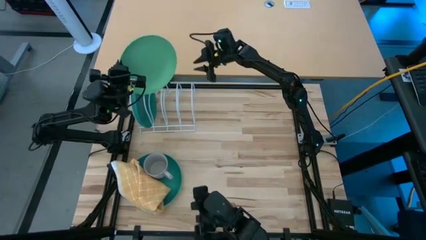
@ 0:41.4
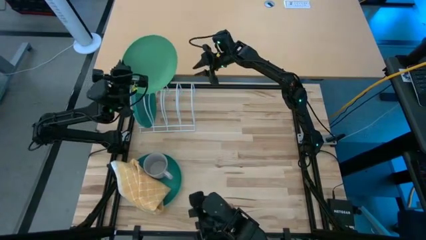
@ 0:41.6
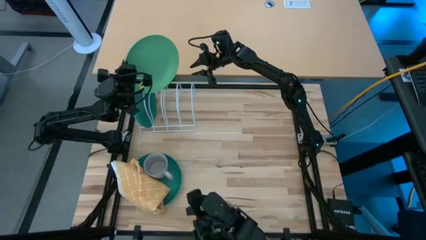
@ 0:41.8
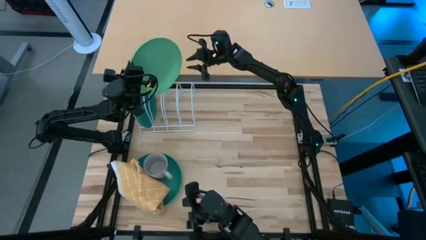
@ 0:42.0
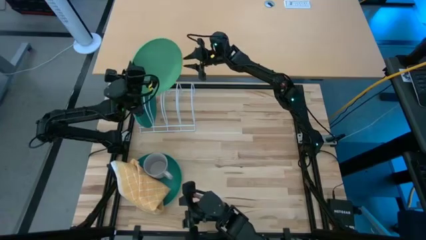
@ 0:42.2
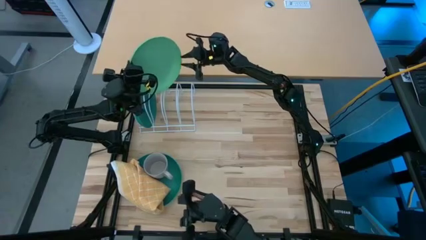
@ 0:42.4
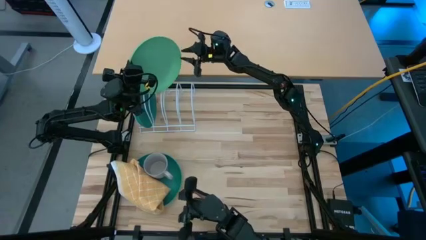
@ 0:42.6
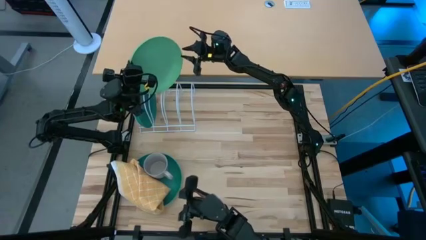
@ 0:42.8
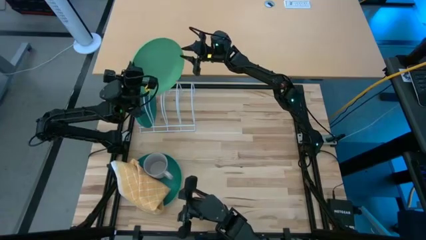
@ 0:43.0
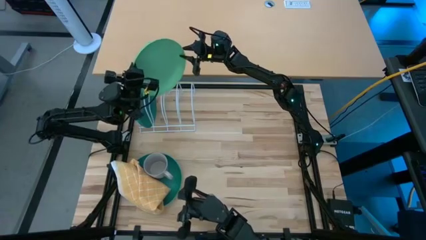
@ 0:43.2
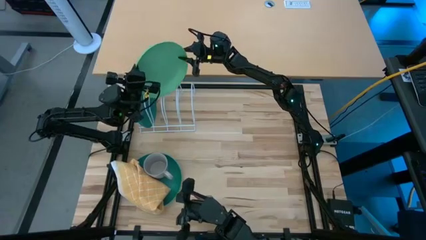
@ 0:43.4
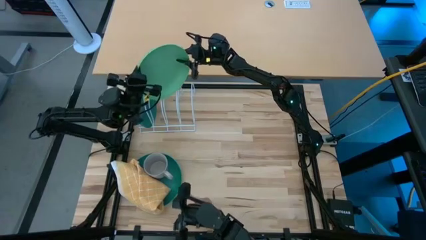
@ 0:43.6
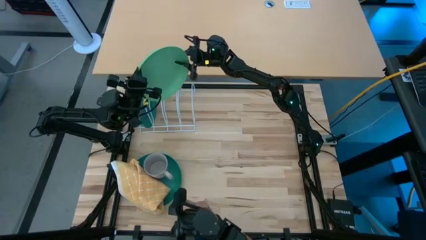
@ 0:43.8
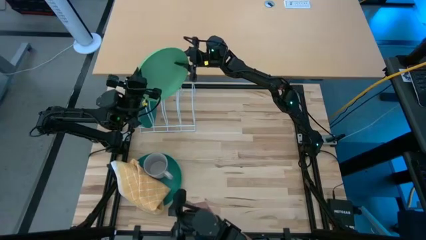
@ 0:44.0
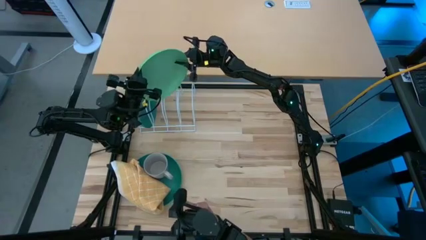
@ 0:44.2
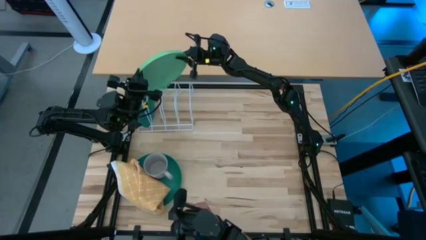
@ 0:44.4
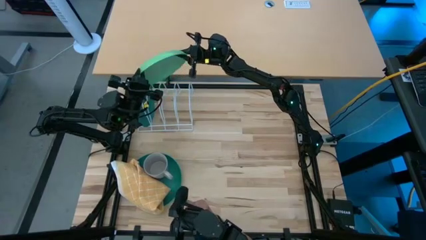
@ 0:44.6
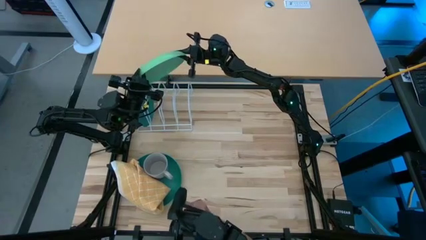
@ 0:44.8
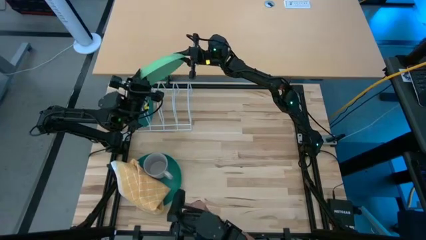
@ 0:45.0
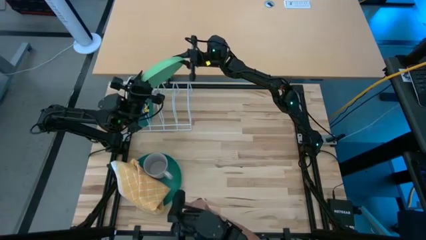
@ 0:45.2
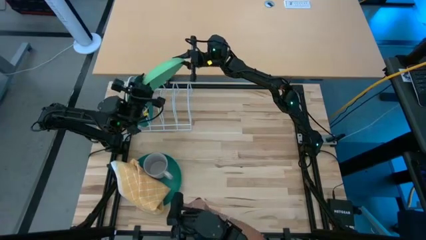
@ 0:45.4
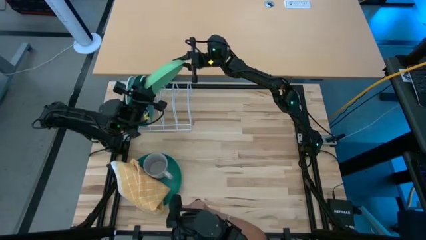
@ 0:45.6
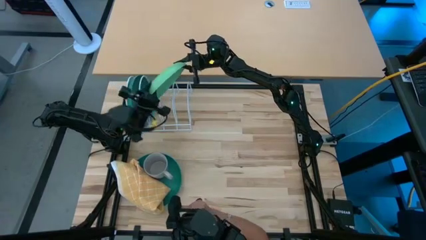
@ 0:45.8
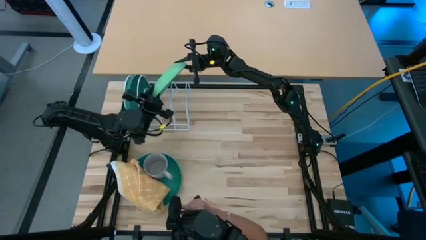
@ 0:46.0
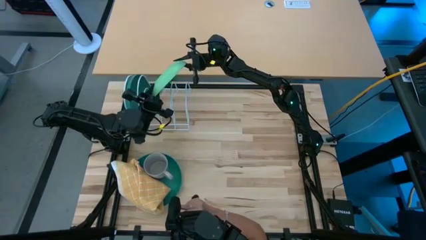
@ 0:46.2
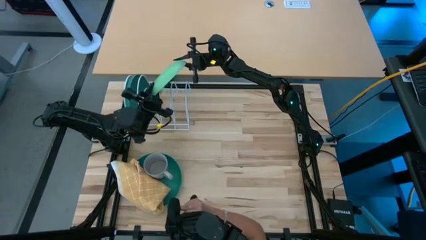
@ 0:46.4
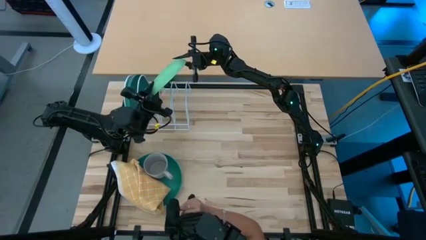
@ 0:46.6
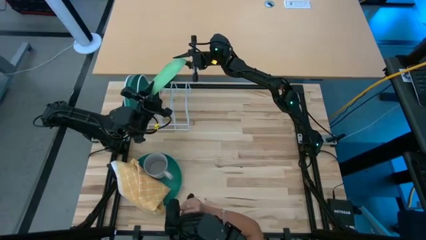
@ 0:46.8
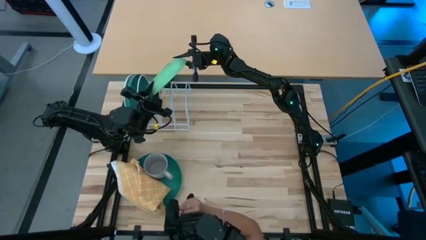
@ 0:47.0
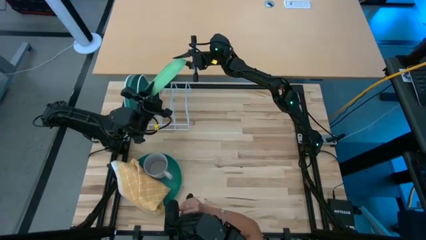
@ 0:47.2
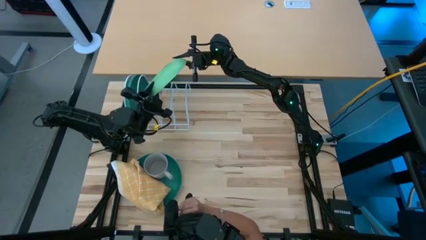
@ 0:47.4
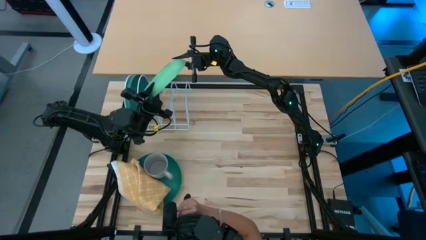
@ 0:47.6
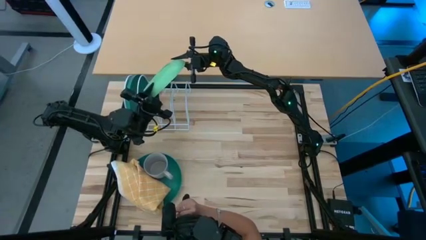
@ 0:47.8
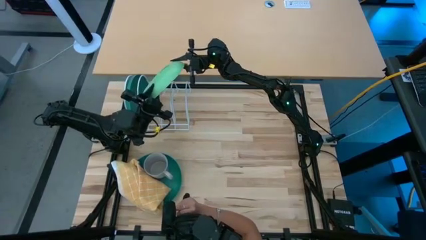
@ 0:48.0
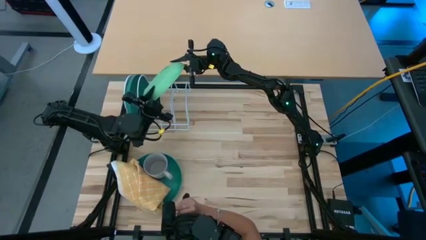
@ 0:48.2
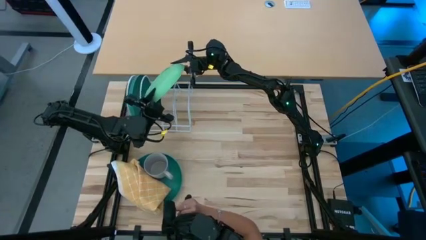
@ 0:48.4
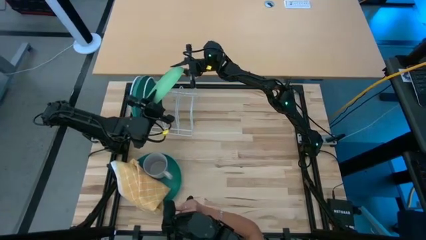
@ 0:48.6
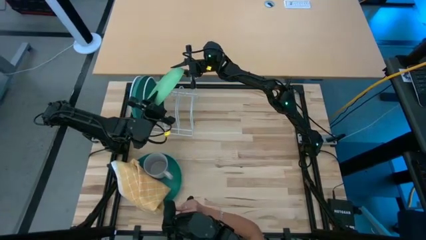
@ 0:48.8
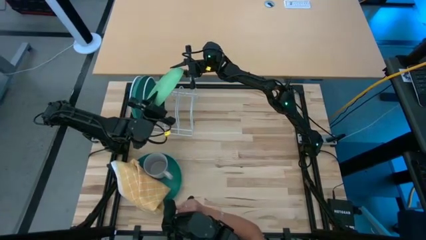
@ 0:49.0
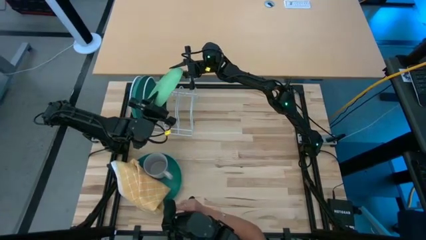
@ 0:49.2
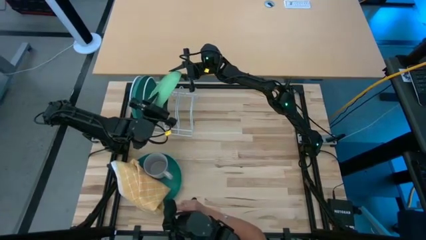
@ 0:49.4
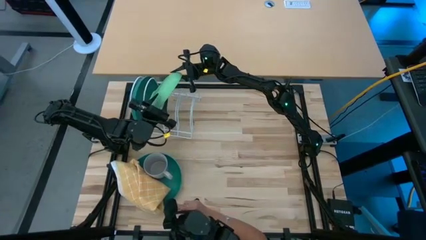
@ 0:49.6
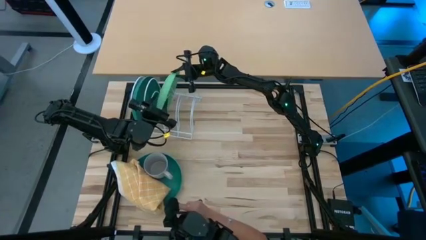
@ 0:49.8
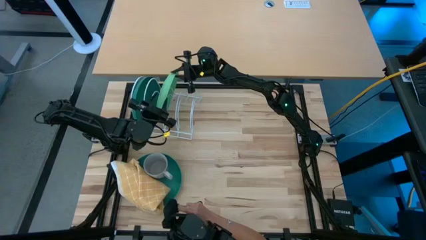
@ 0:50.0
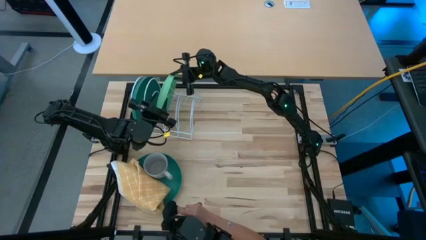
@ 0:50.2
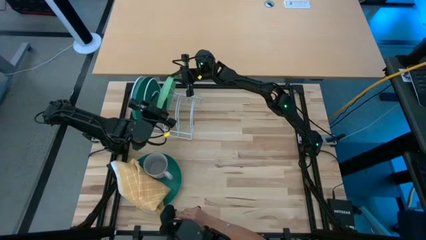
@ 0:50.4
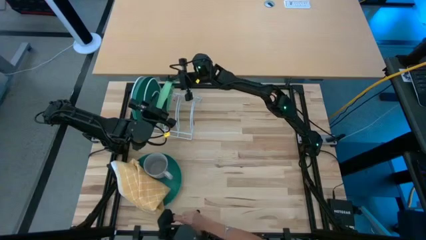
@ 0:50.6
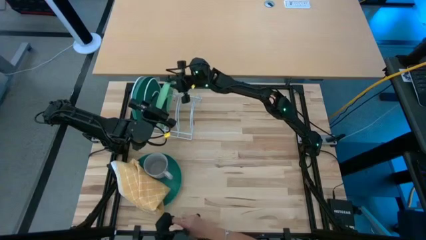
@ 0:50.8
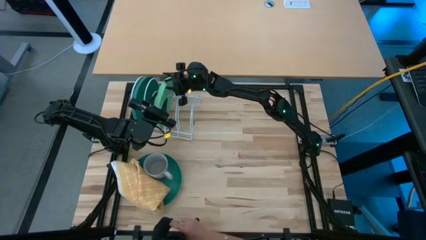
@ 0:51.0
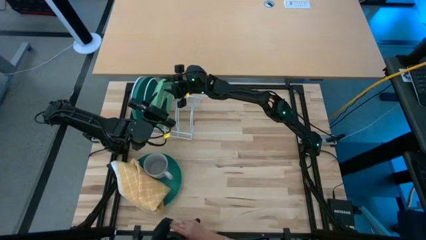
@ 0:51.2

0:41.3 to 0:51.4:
Task: Sort dishes
Put the right light green plate into the dish rack
